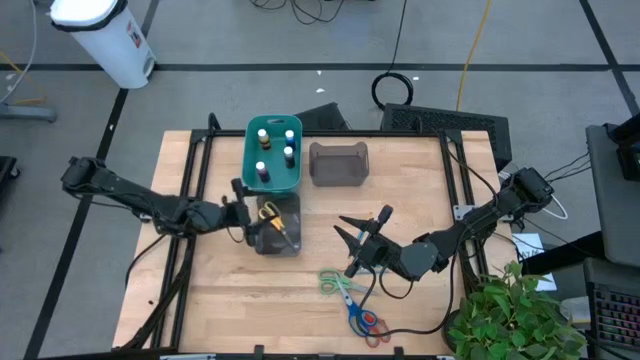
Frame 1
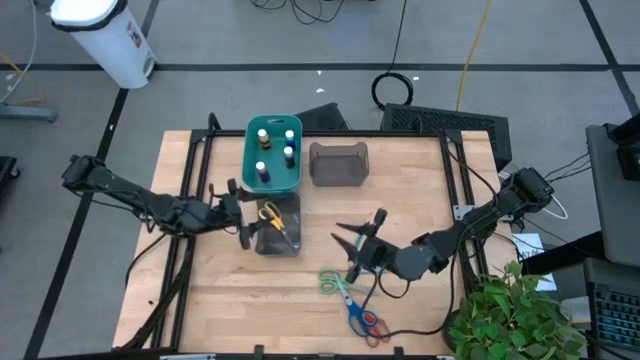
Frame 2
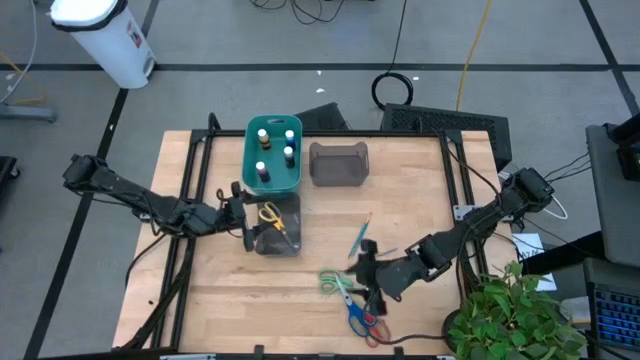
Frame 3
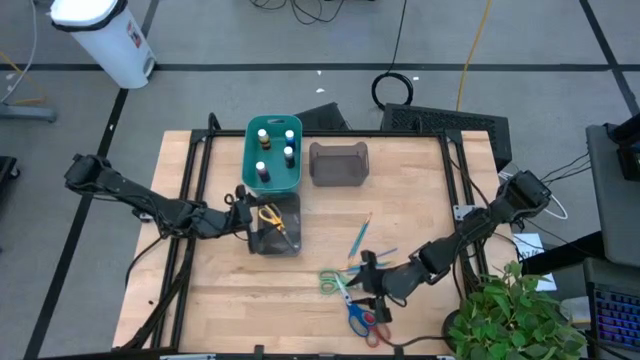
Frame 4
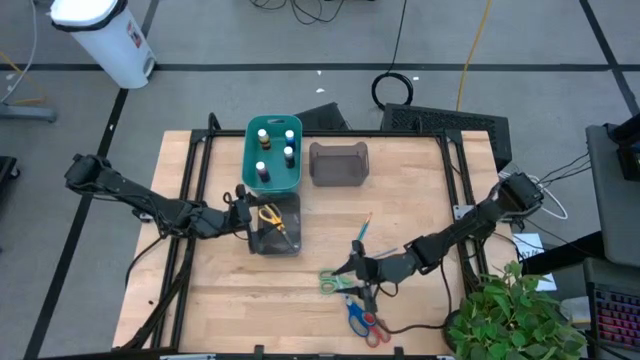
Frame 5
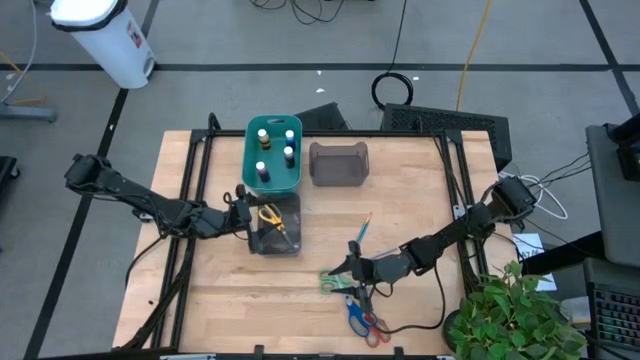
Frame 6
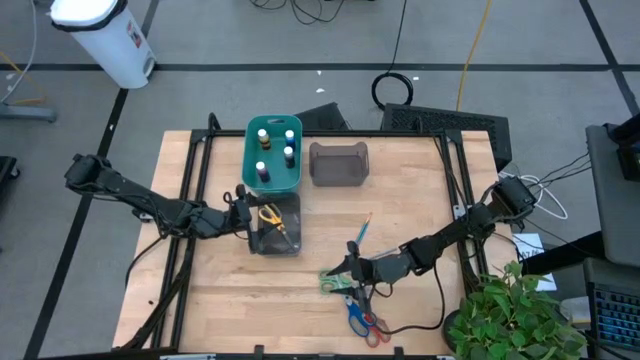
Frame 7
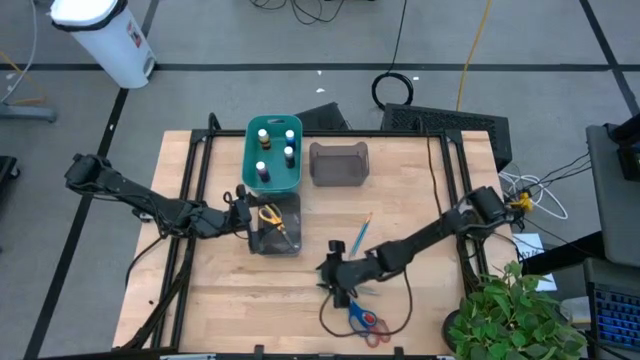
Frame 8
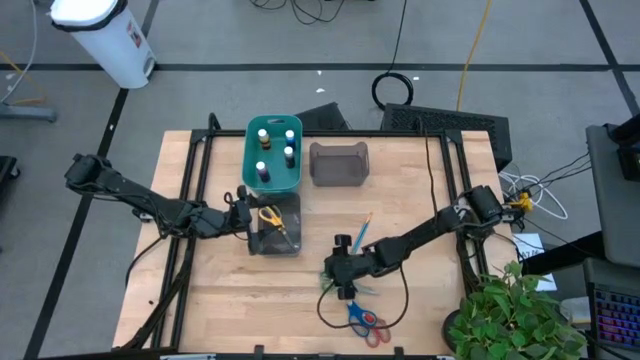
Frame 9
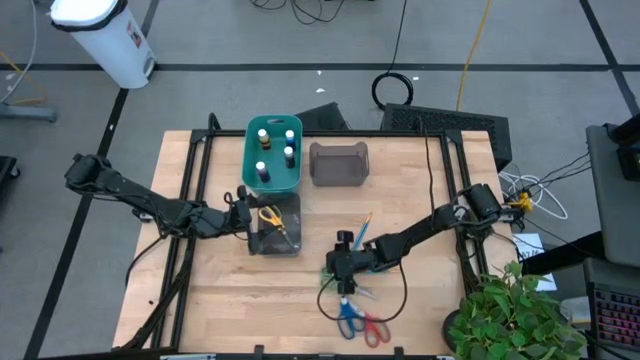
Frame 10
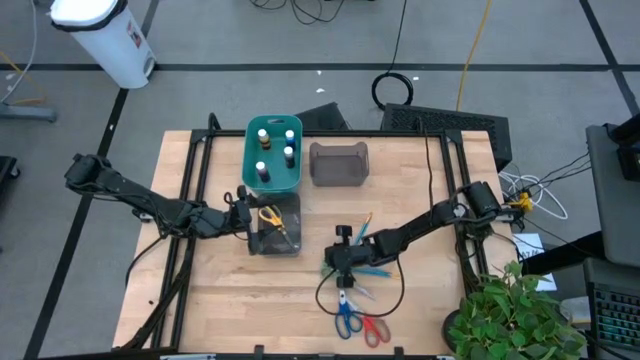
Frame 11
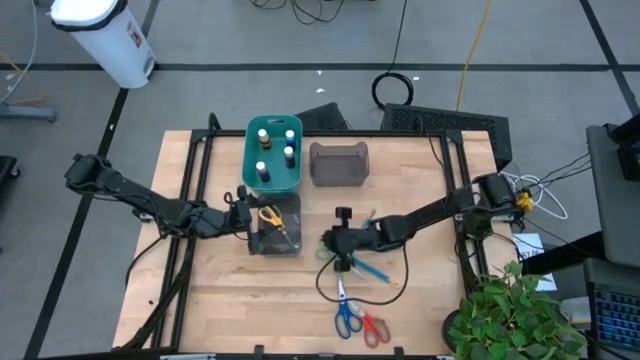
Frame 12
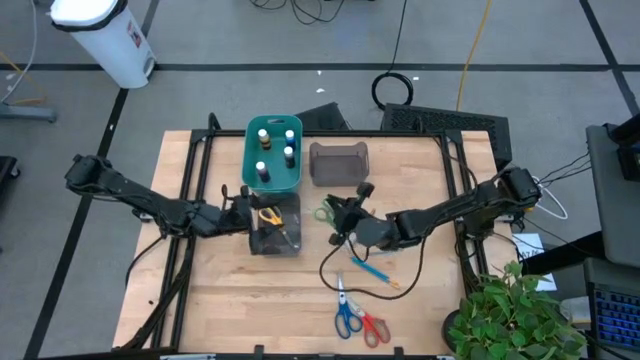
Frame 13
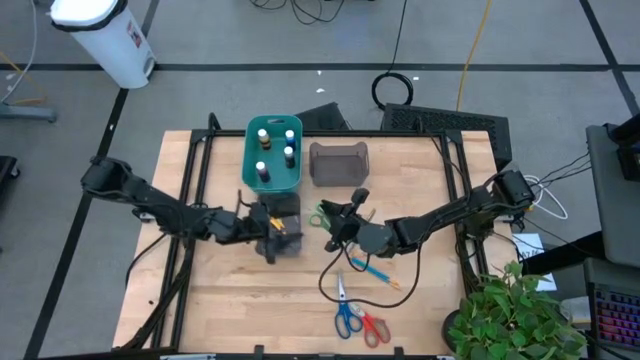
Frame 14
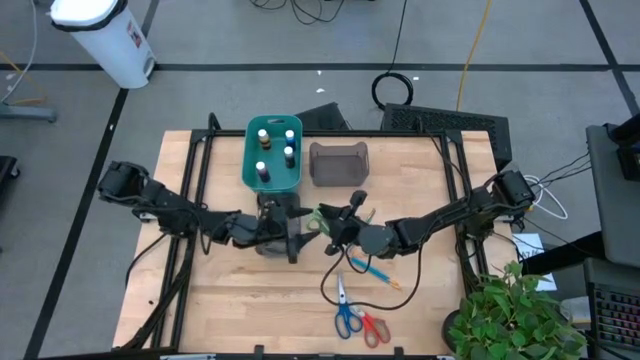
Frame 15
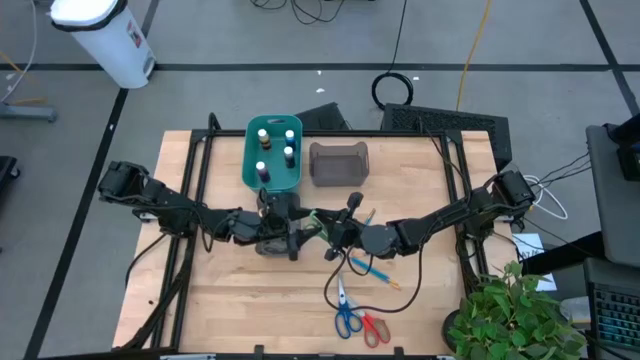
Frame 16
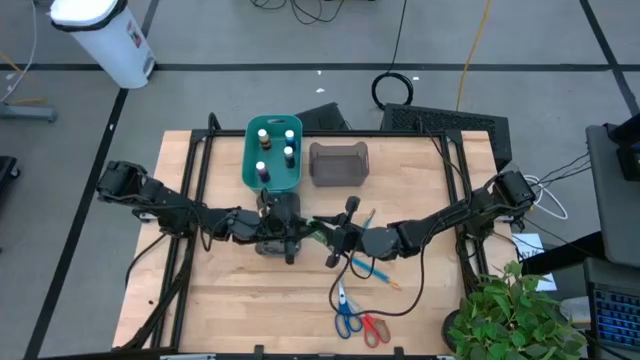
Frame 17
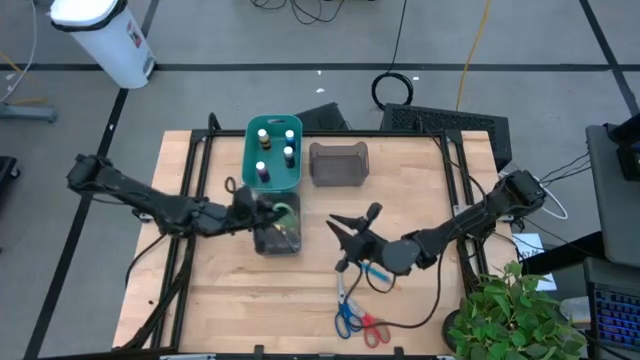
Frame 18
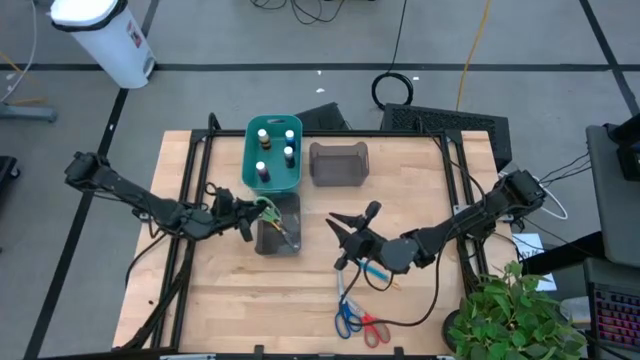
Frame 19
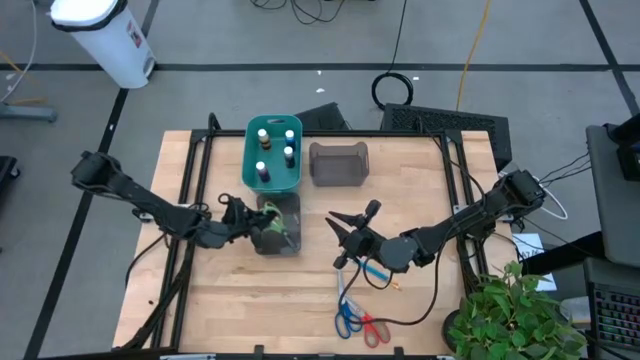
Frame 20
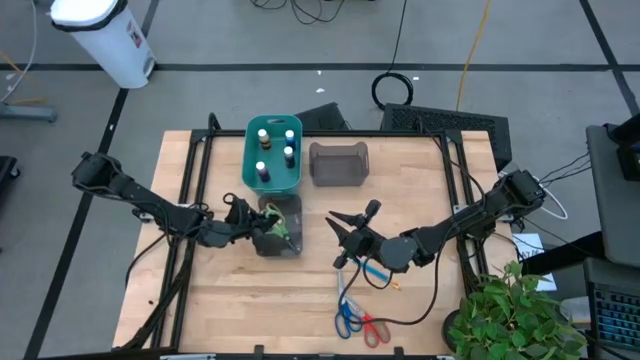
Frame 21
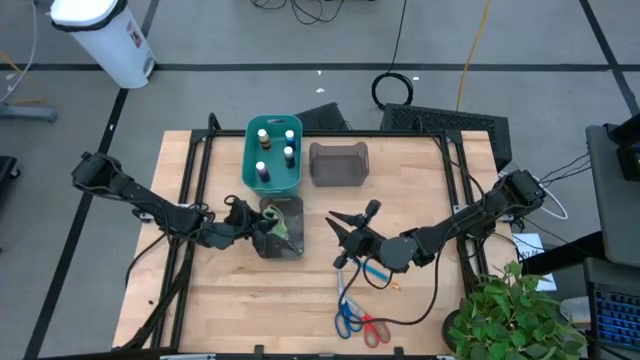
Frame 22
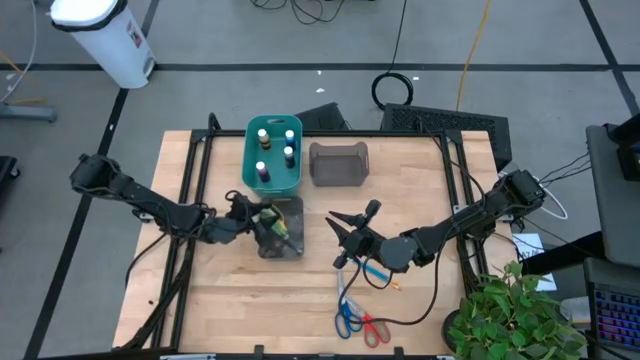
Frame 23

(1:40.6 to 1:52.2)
Task: Pick & Place Paint Supplies
Put the green scissors into the bottom black bin

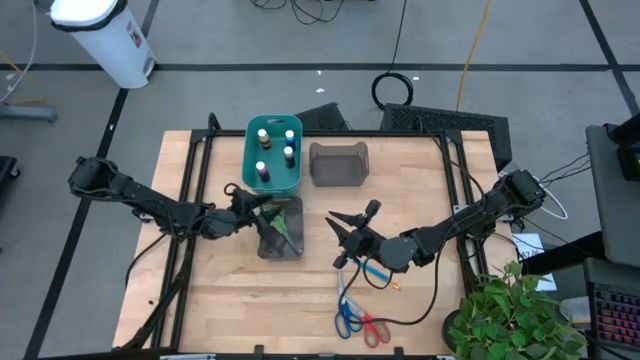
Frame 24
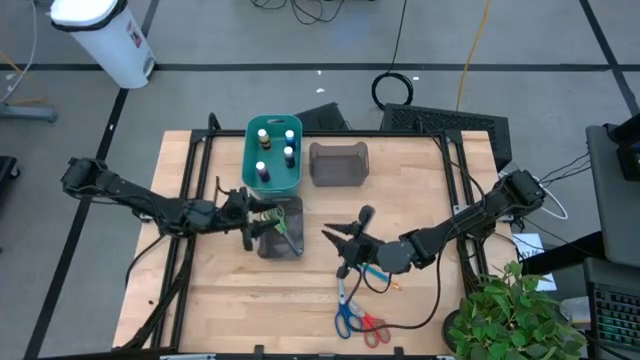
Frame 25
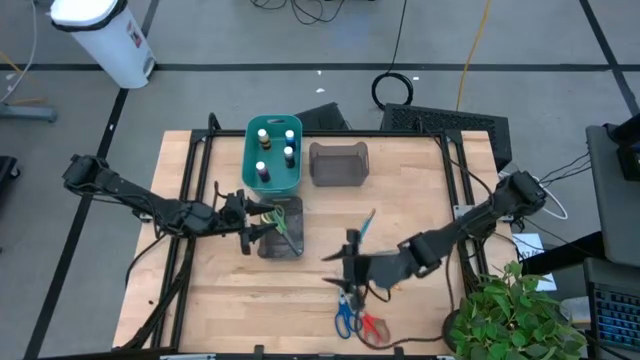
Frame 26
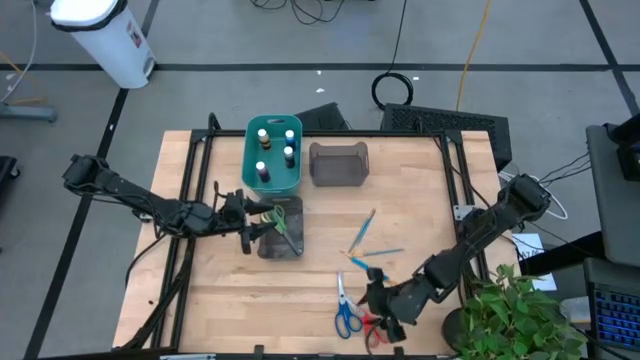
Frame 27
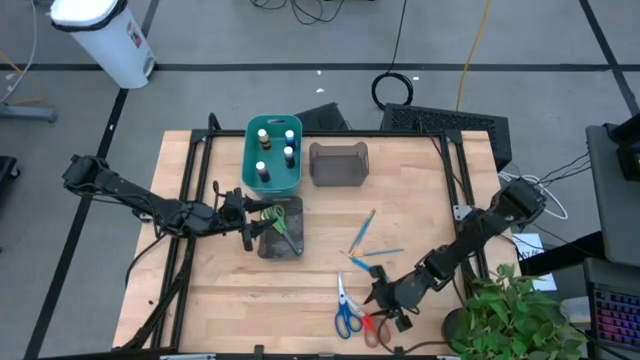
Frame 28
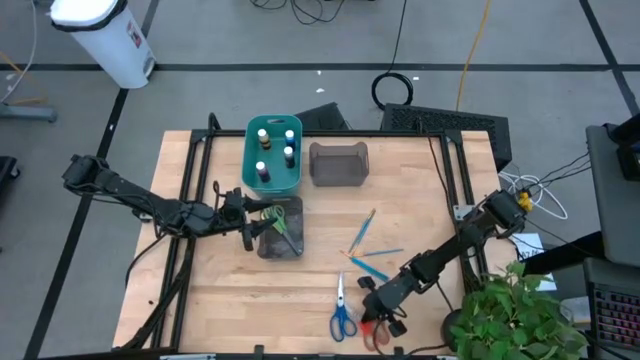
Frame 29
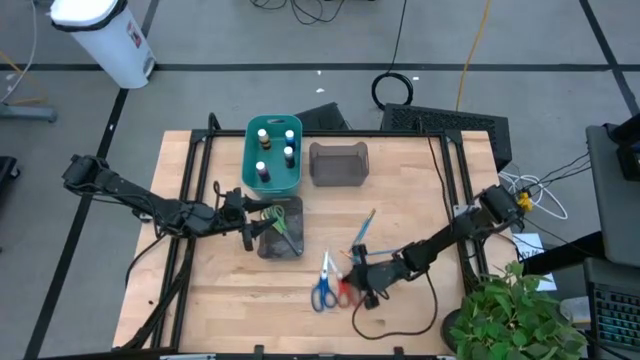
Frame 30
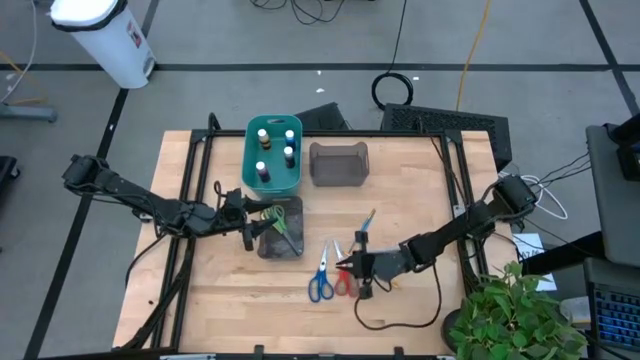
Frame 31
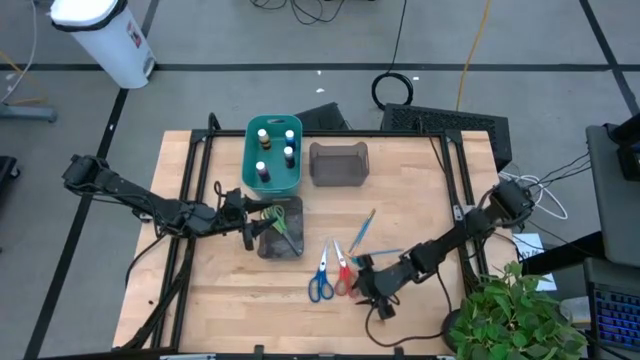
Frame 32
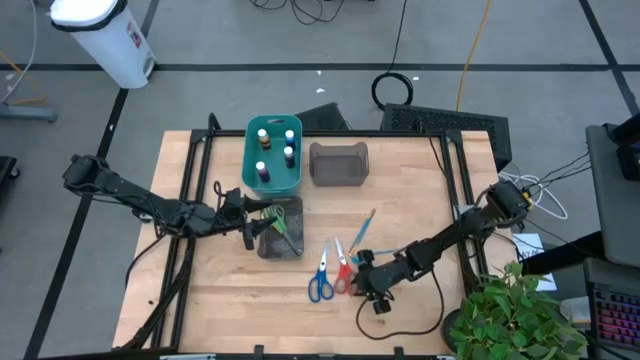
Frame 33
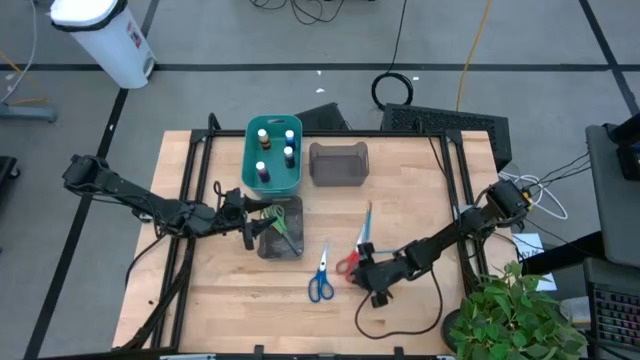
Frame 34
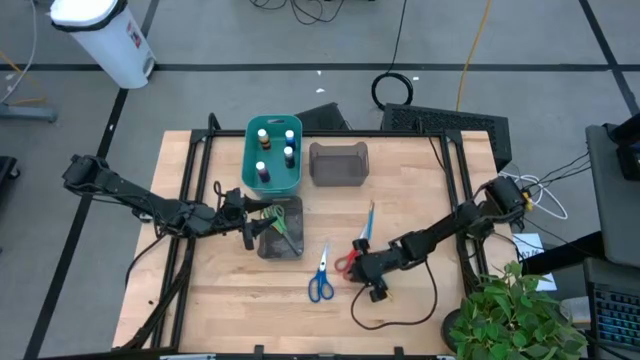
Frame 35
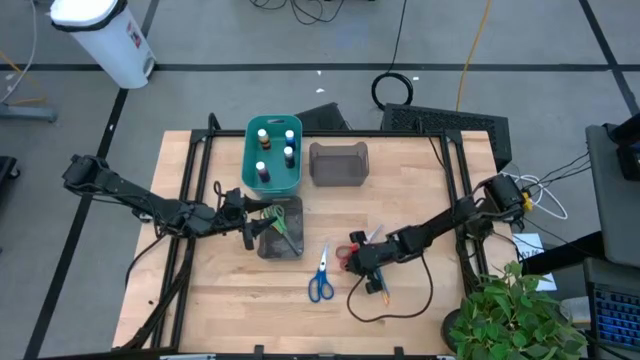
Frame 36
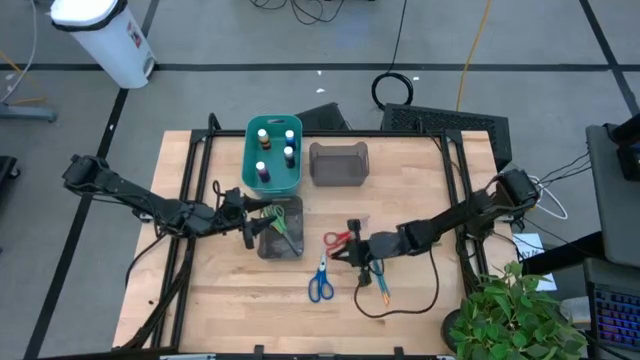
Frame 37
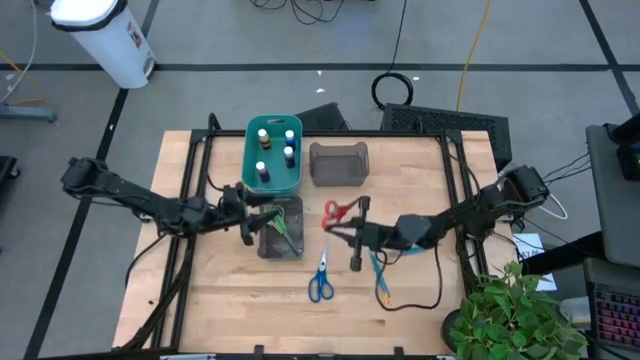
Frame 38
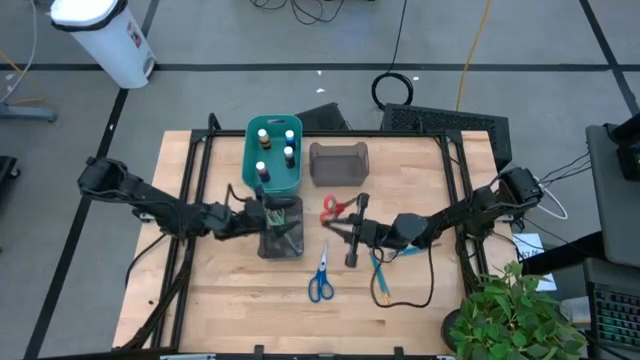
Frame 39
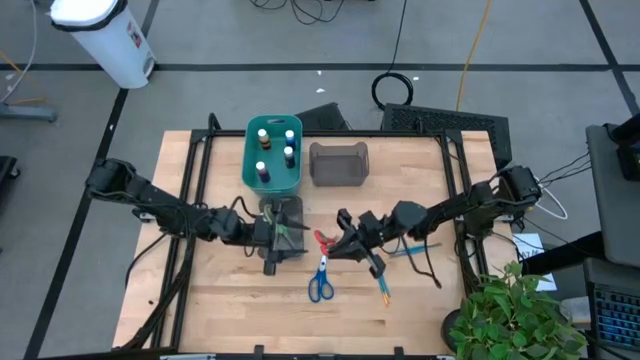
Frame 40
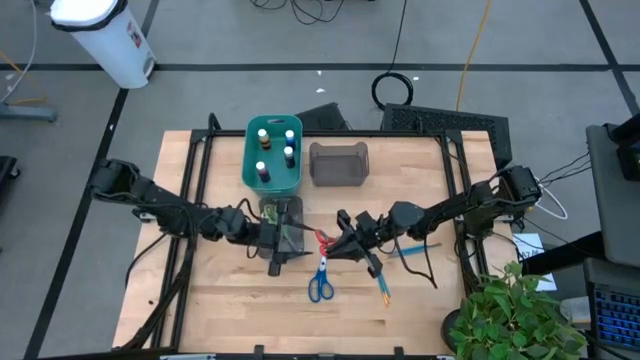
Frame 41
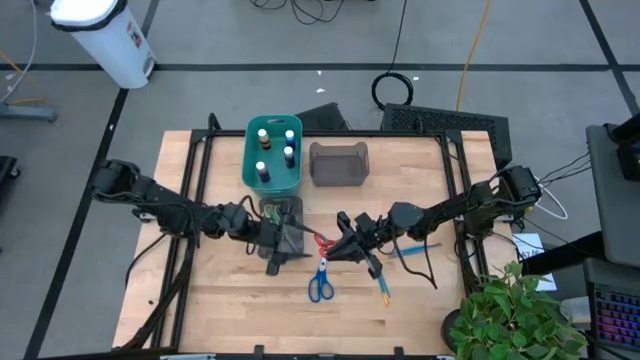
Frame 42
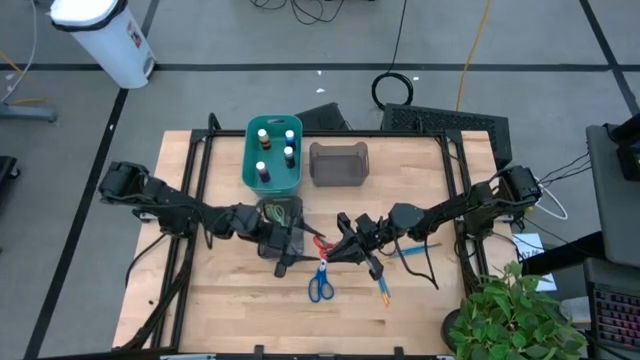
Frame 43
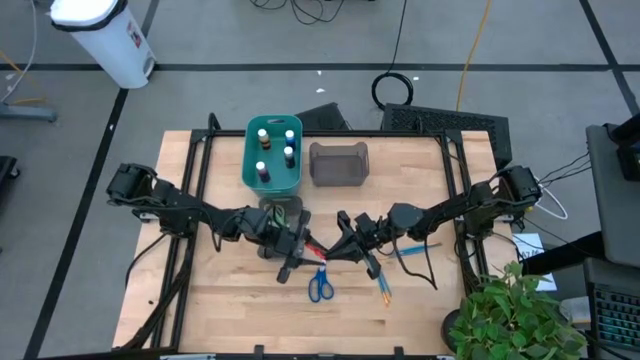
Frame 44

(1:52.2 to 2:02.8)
Put the red scissors into the bottom black bin
